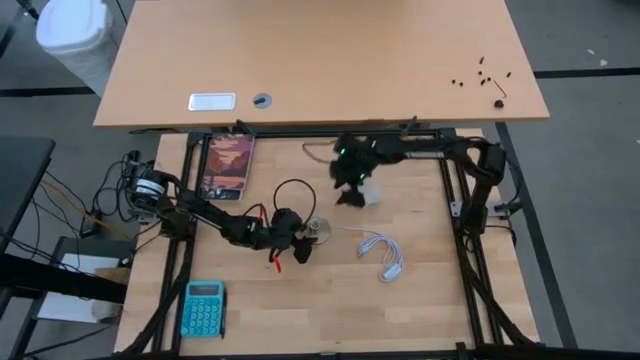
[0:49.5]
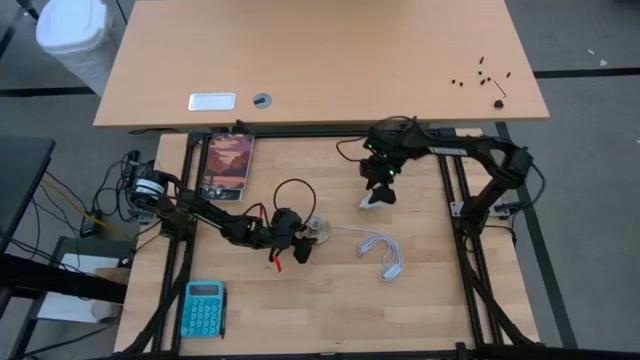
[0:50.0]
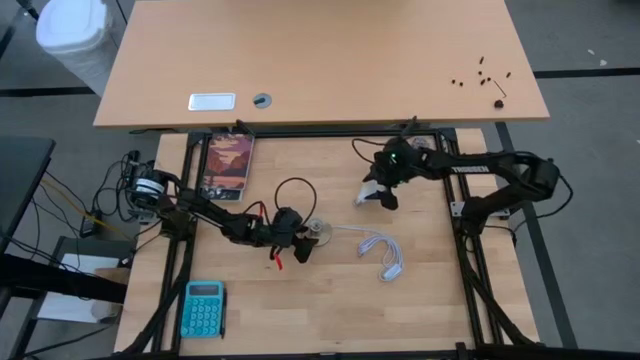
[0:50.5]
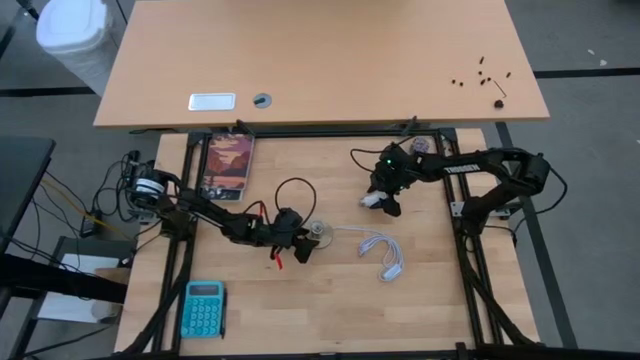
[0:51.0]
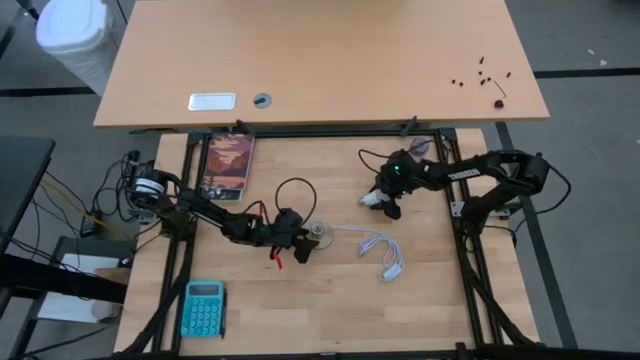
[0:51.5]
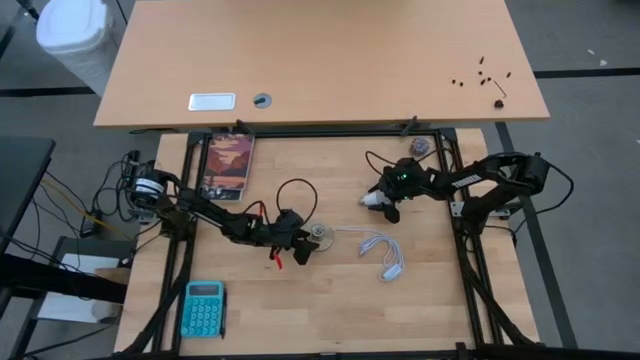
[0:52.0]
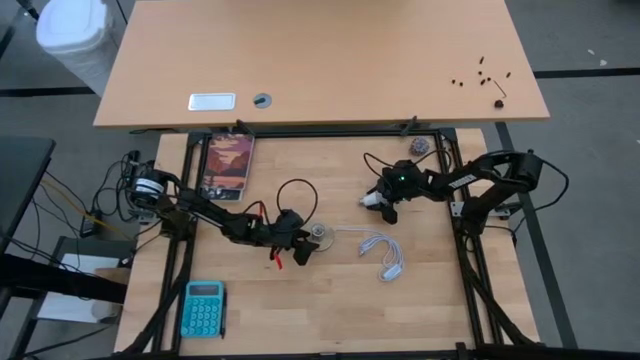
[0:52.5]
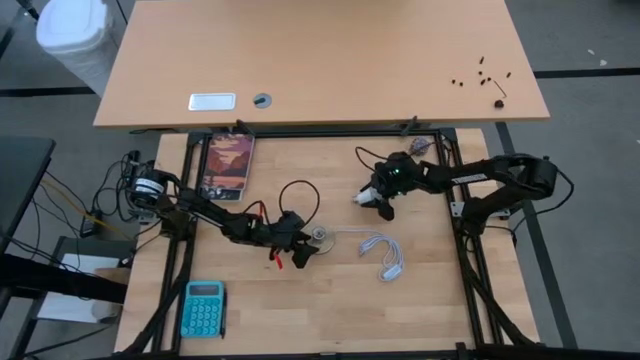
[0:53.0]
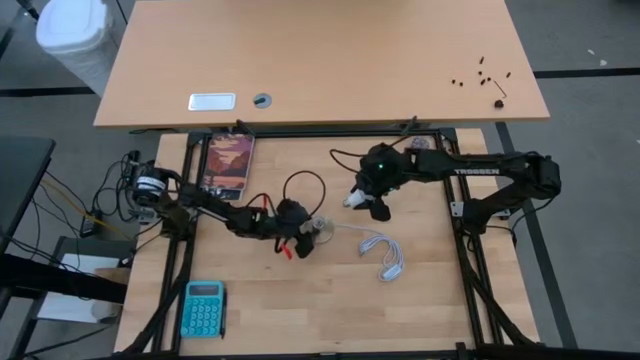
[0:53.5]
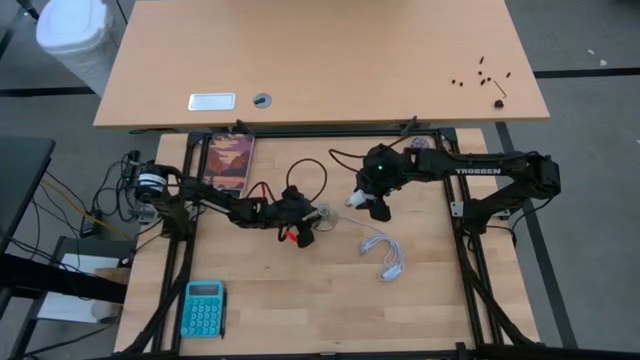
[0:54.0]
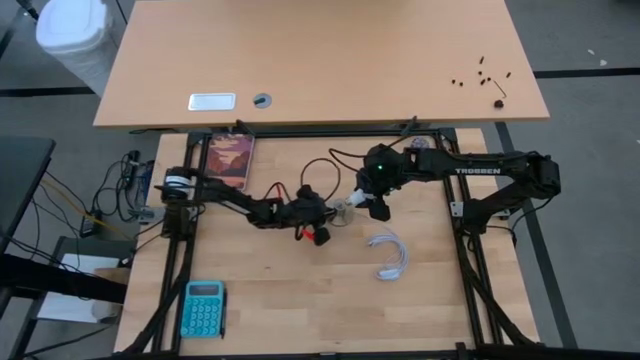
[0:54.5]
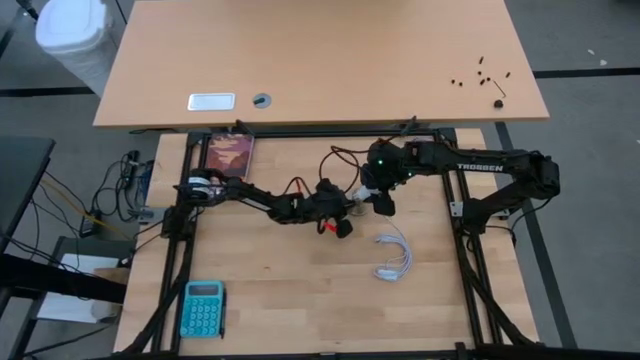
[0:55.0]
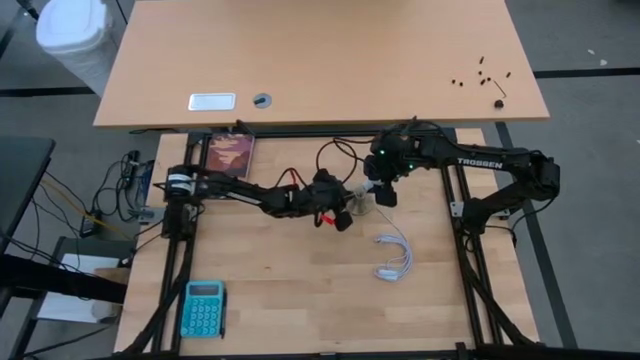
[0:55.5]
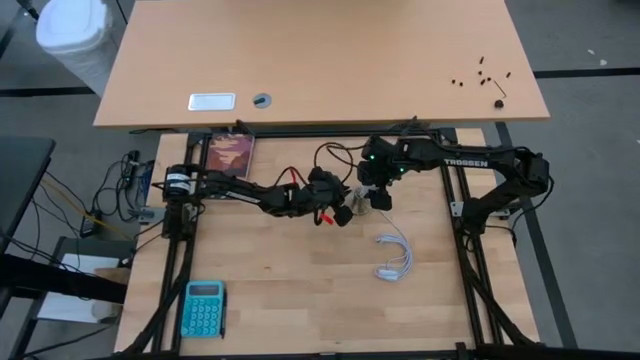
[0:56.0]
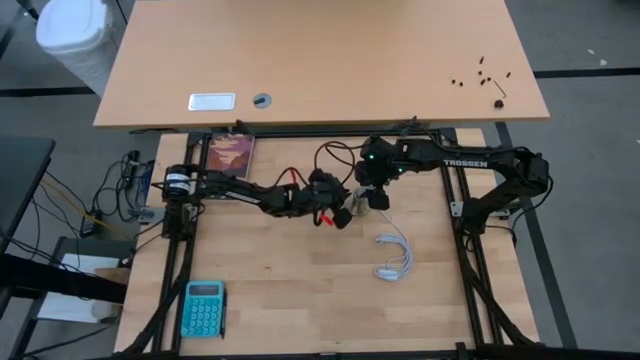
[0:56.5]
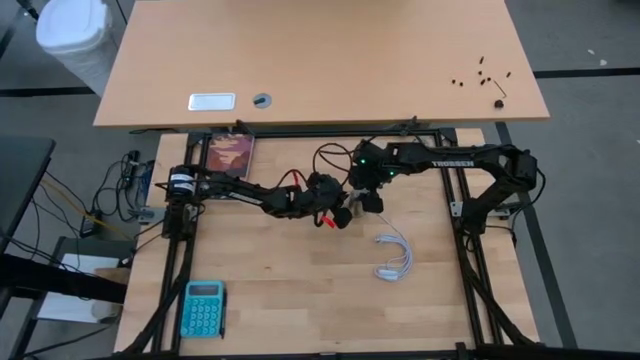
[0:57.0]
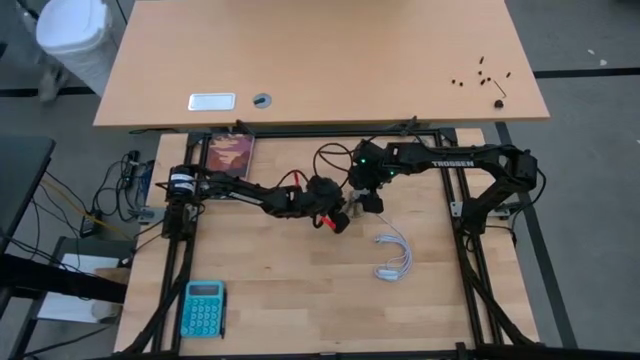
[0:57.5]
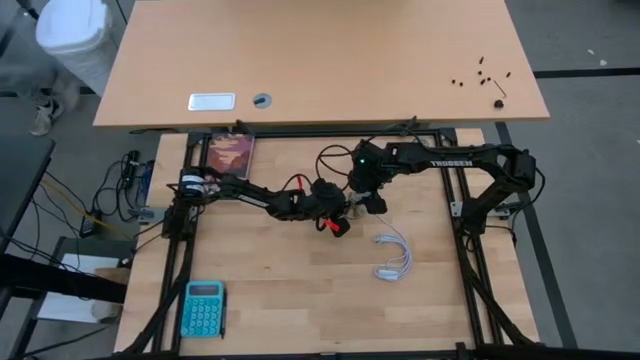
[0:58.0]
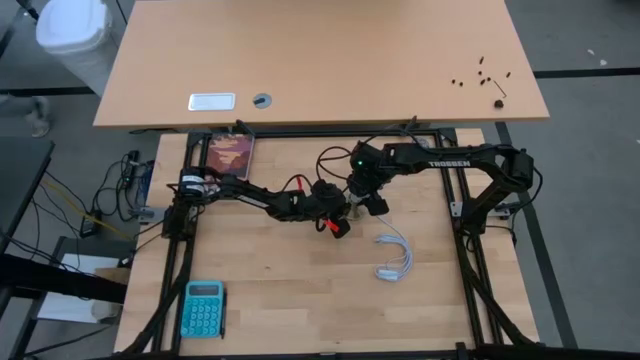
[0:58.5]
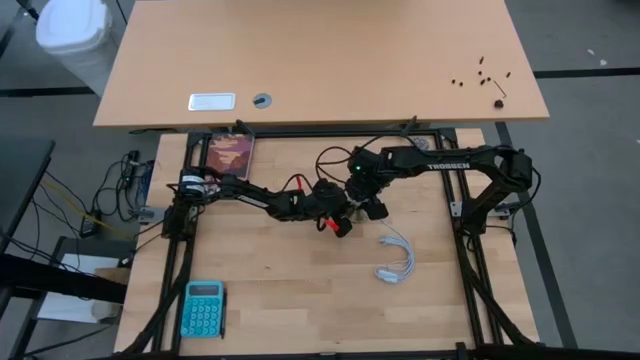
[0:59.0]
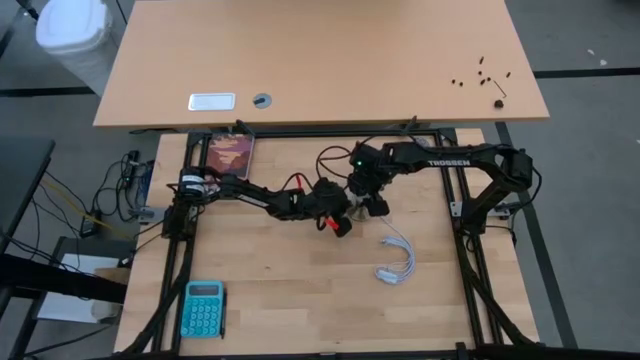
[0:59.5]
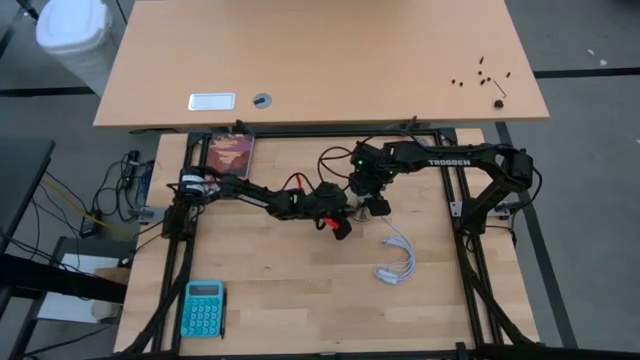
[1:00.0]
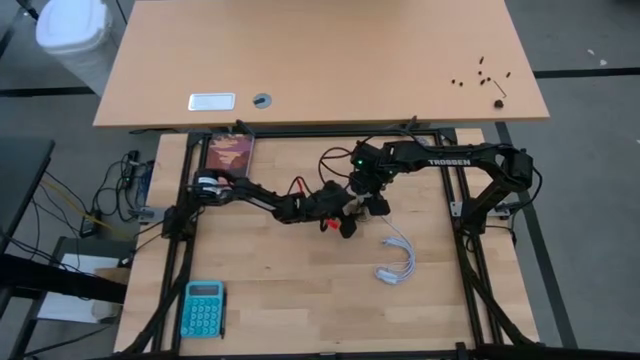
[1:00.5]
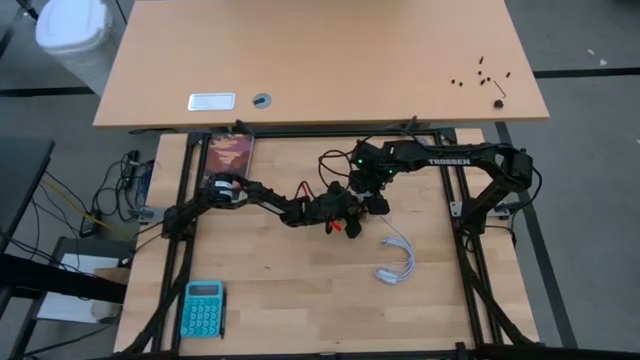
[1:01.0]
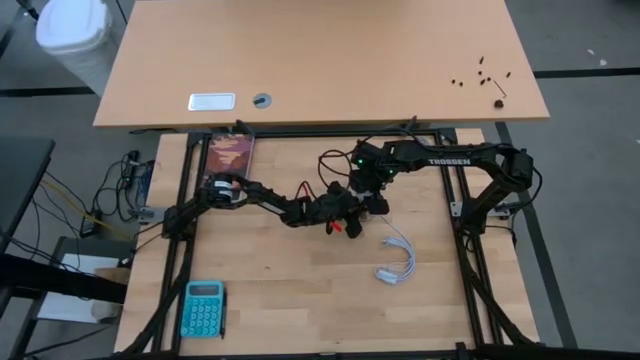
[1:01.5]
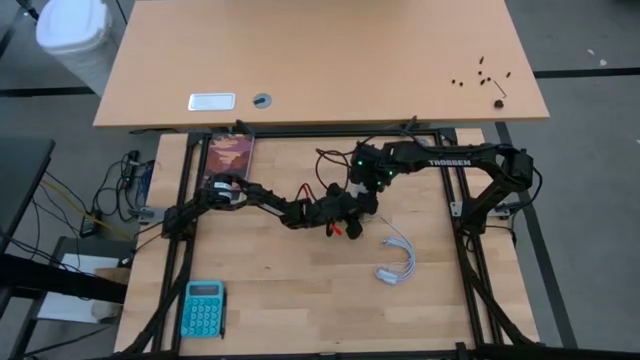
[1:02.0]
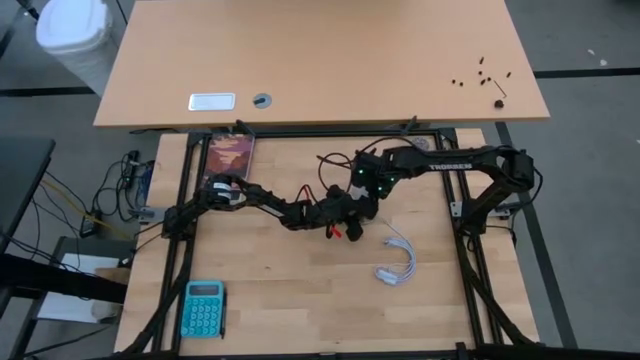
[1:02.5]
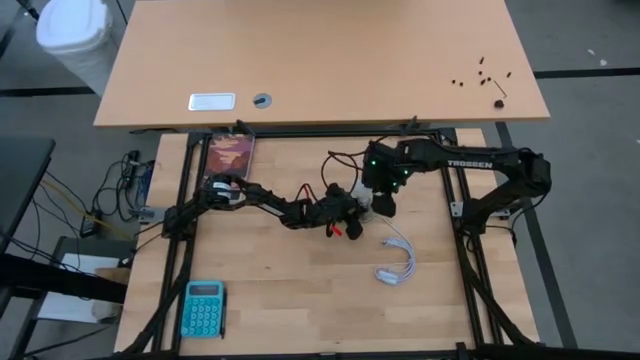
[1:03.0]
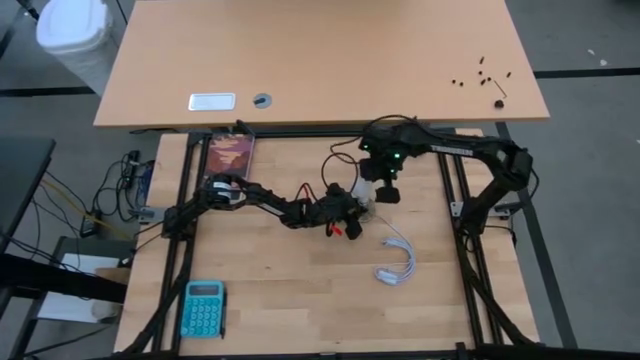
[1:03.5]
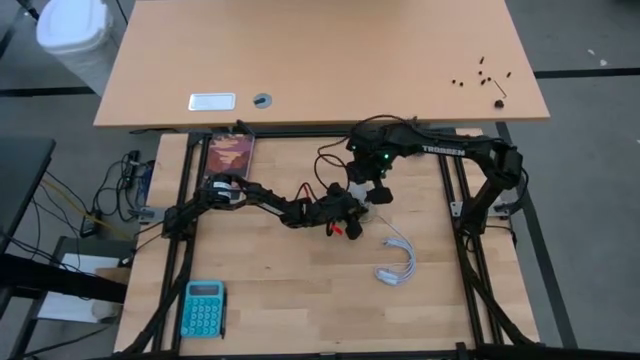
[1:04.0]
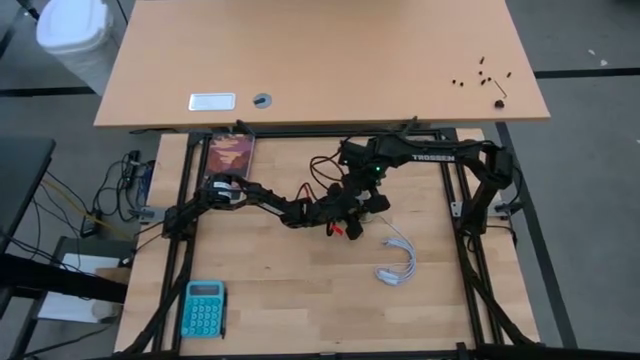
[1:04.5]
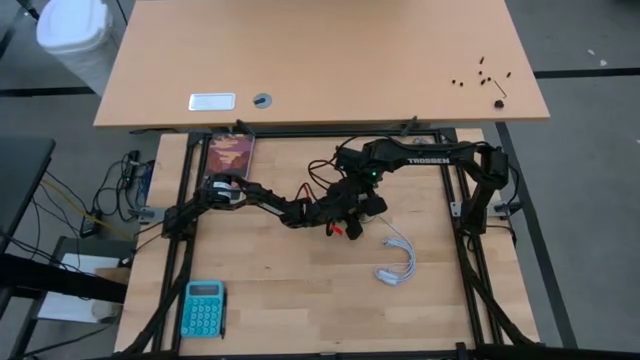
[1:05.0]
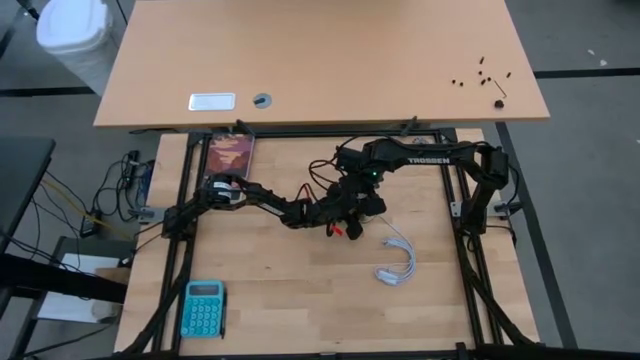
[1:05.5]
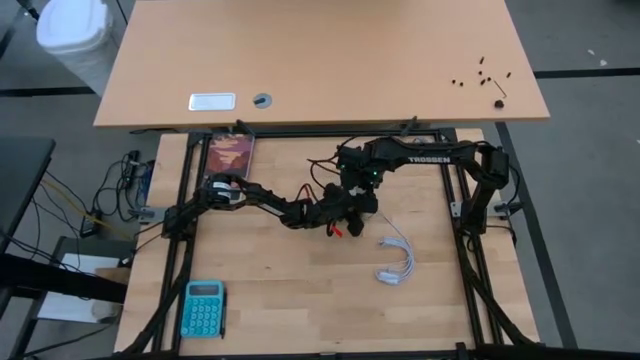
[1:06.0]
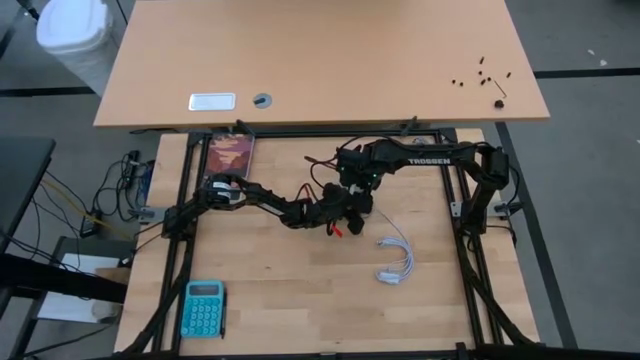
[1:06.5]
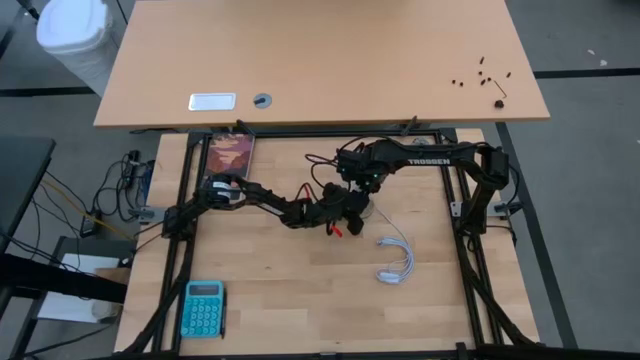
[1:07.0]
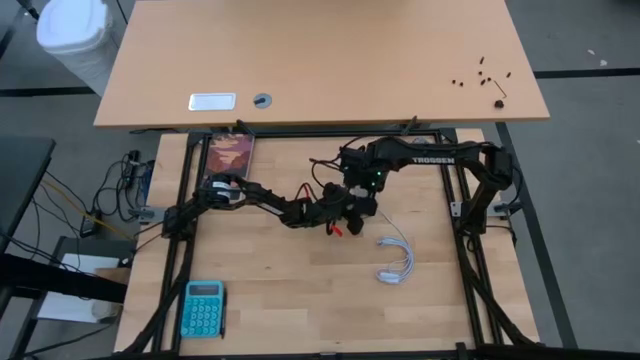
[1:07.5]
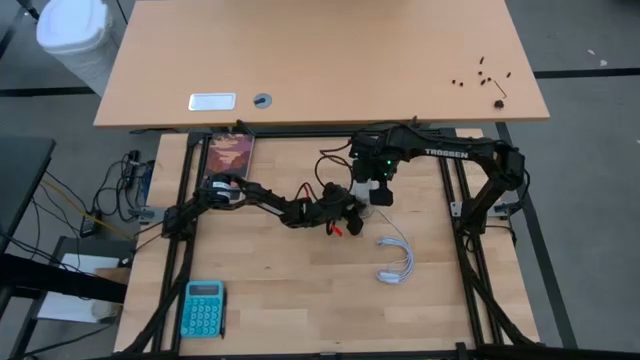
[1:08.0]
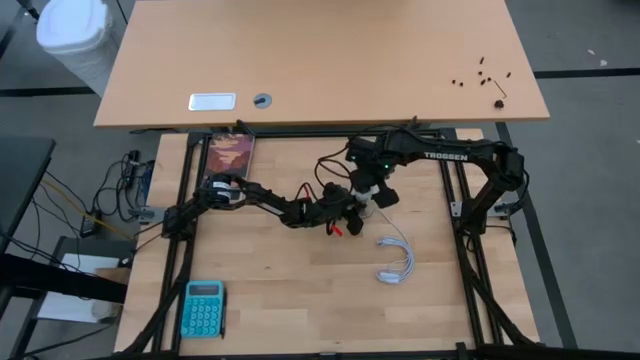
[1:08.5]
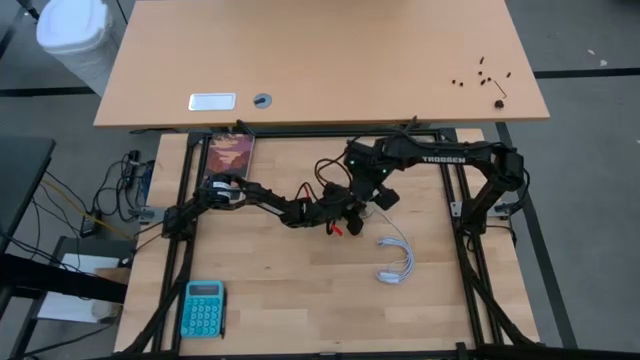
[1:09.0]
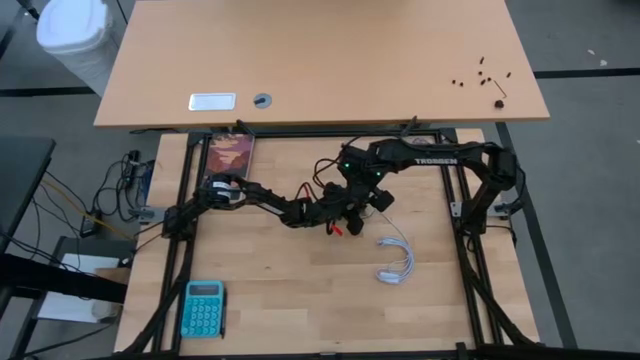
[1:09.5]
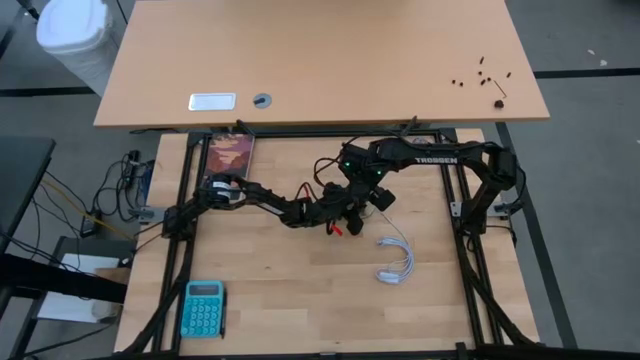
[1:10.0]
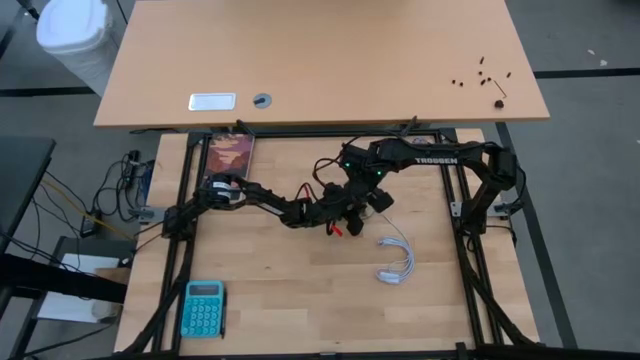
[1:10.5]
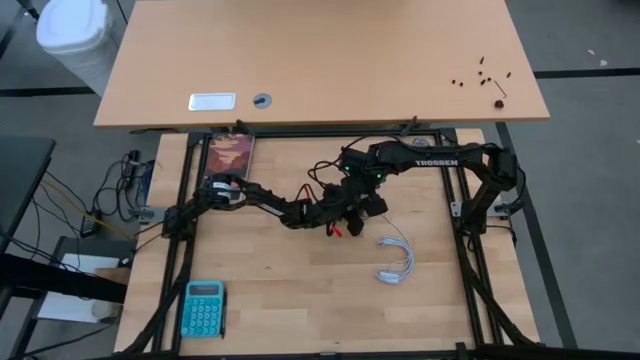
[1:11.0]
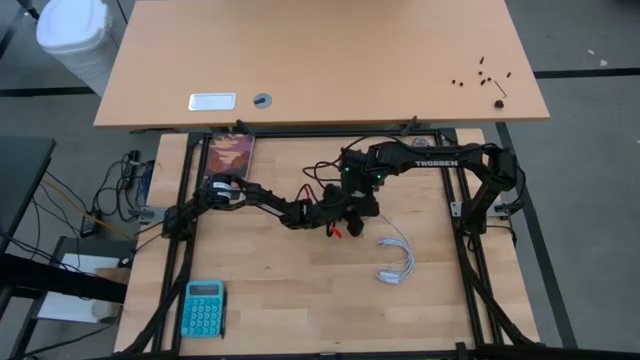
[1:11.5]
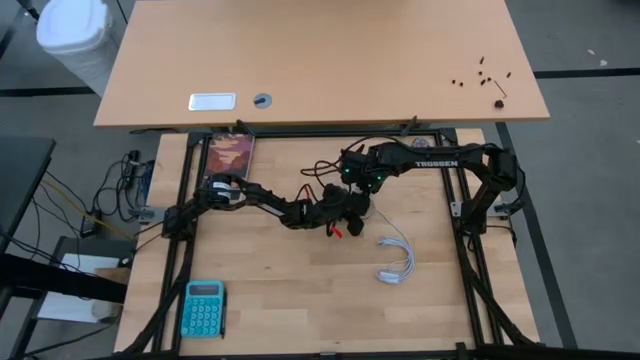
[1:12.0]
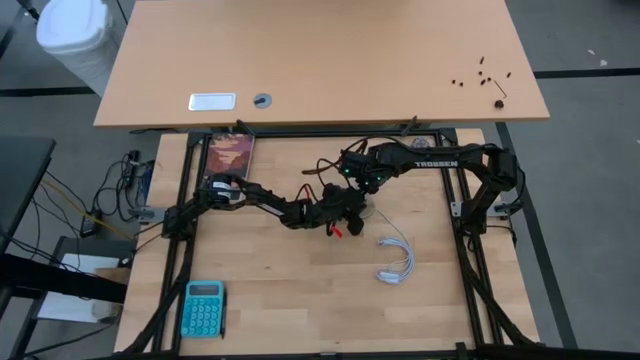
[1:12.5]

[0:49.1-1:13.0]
Task: Screw lightbulb
Insert the white lightbulb into the lamp
